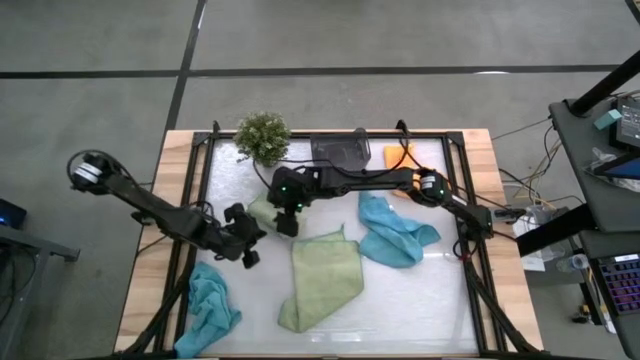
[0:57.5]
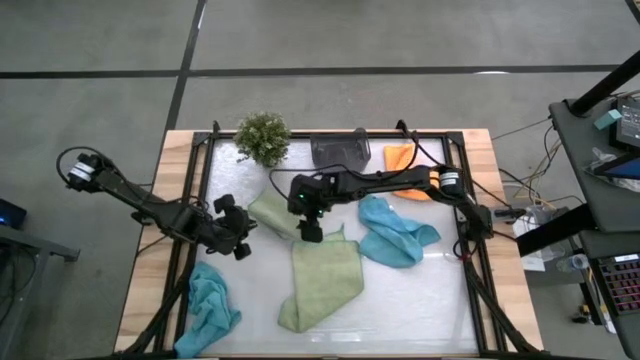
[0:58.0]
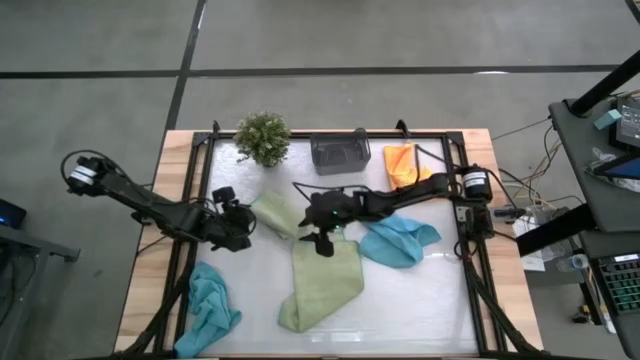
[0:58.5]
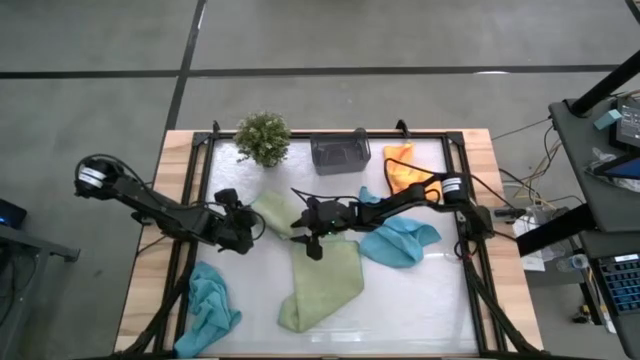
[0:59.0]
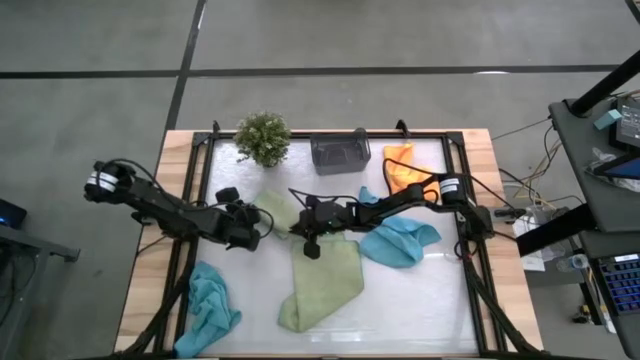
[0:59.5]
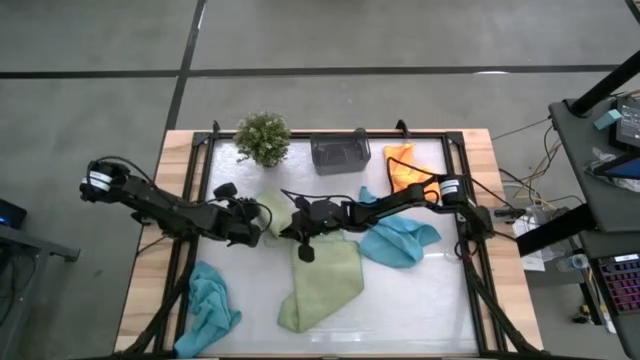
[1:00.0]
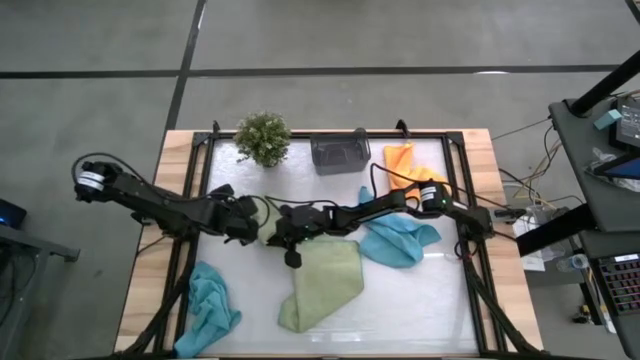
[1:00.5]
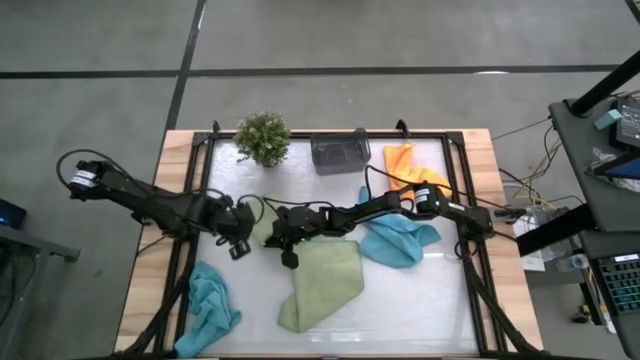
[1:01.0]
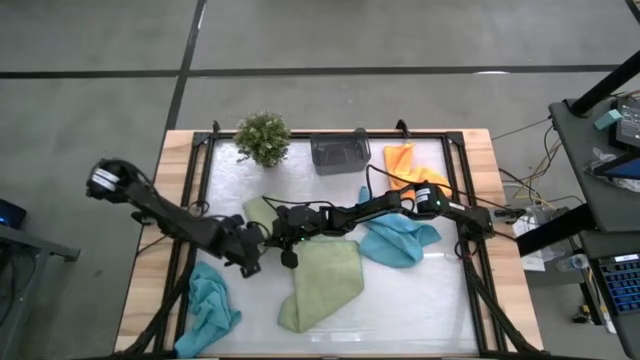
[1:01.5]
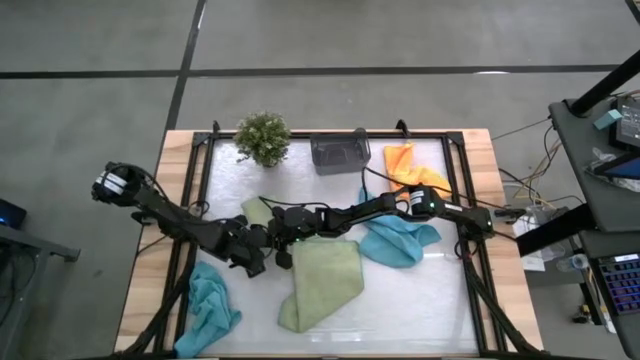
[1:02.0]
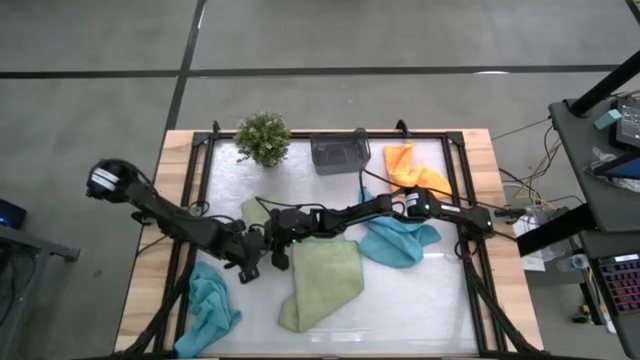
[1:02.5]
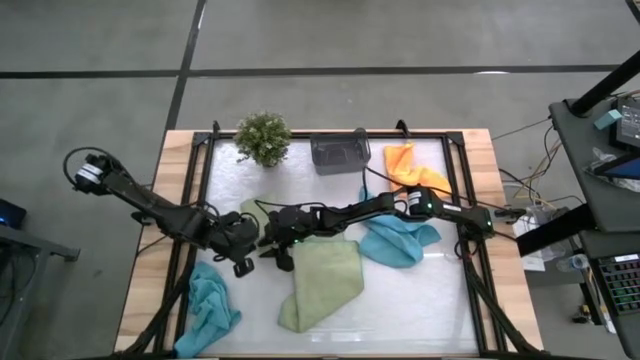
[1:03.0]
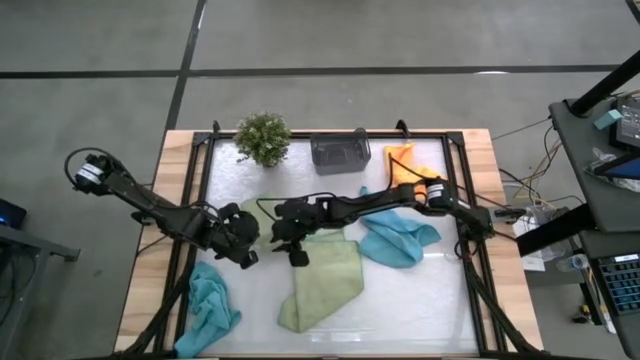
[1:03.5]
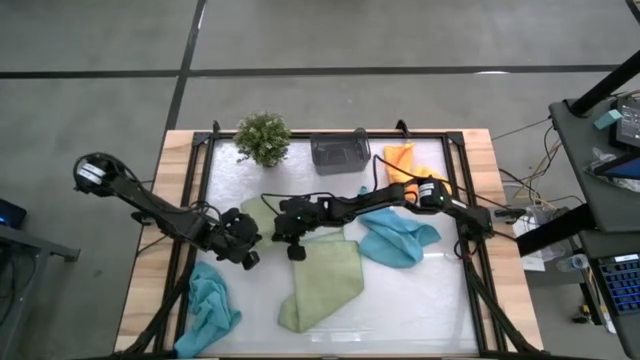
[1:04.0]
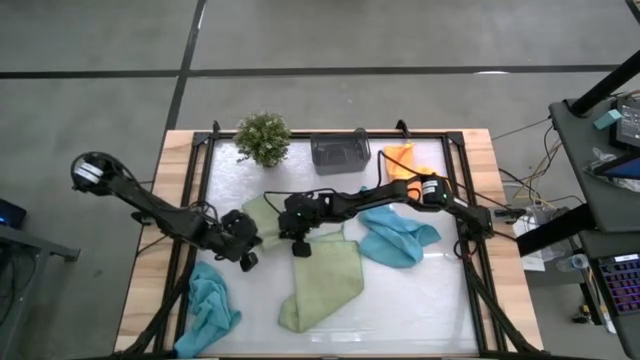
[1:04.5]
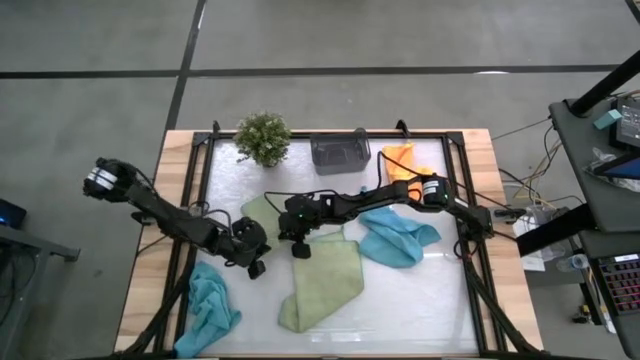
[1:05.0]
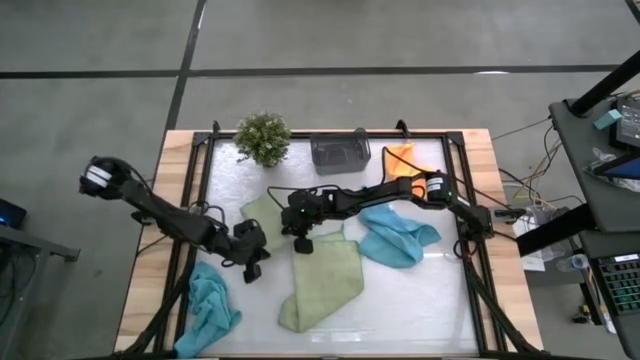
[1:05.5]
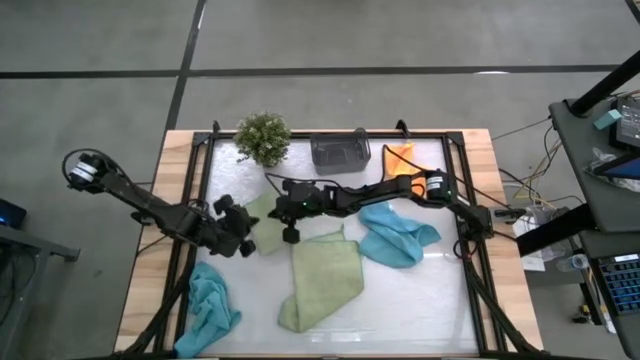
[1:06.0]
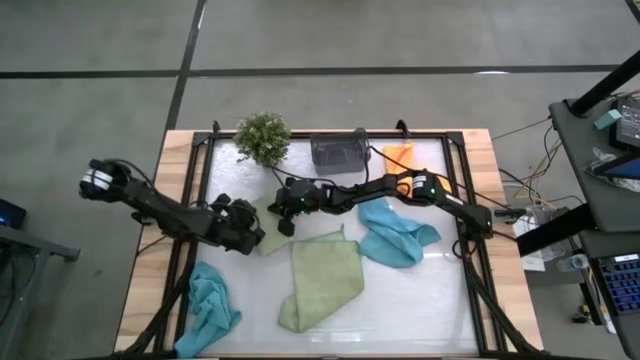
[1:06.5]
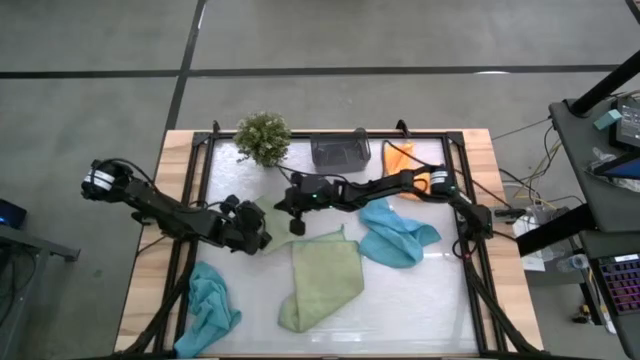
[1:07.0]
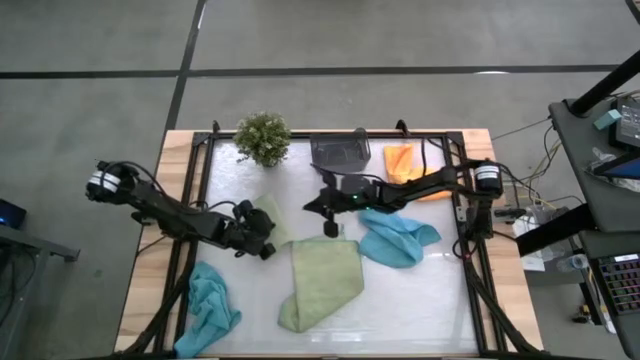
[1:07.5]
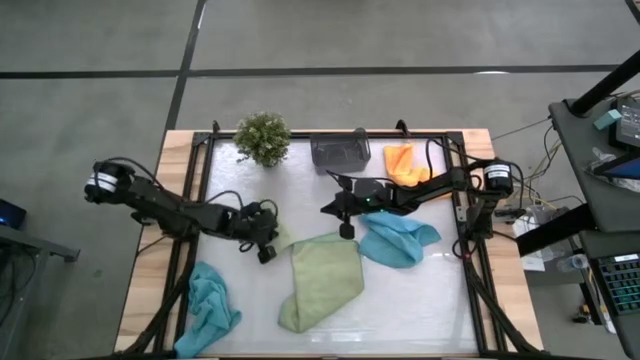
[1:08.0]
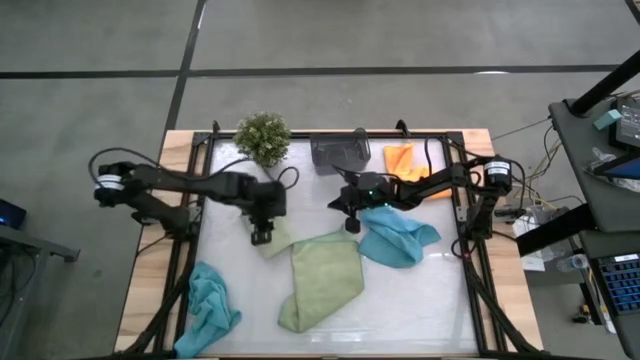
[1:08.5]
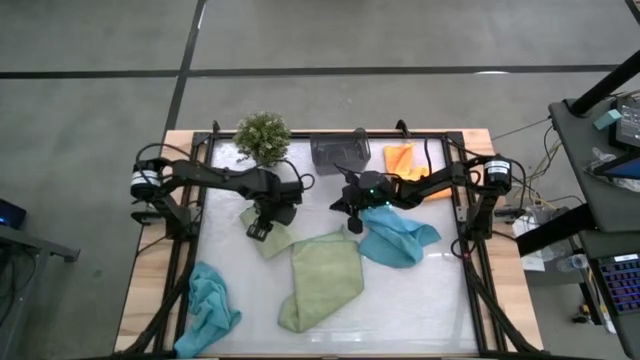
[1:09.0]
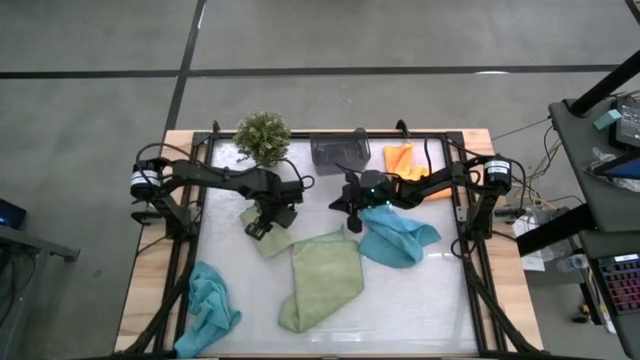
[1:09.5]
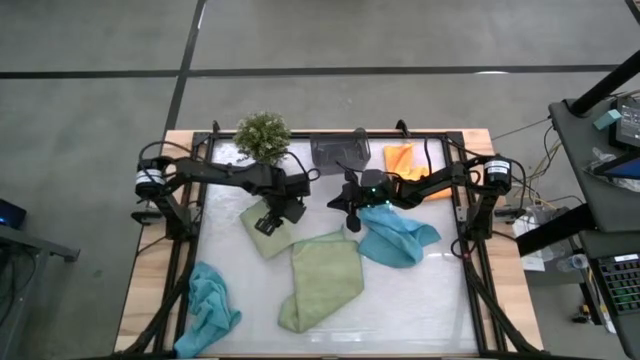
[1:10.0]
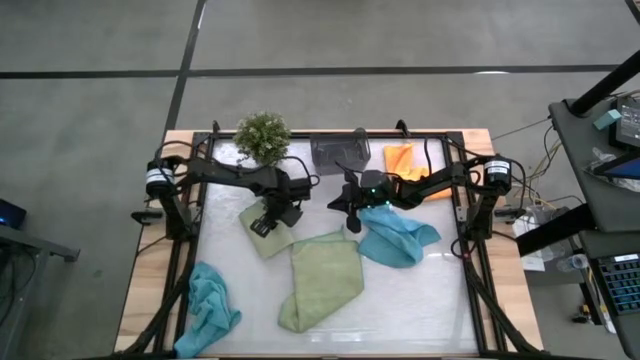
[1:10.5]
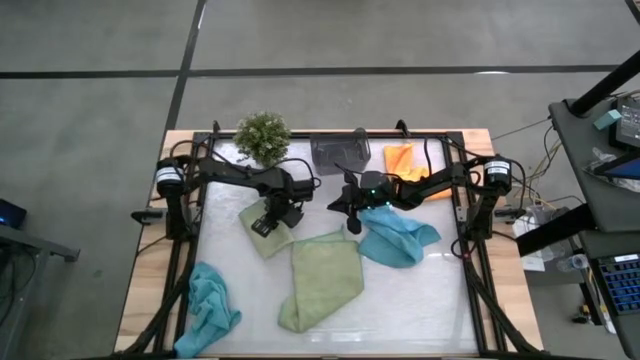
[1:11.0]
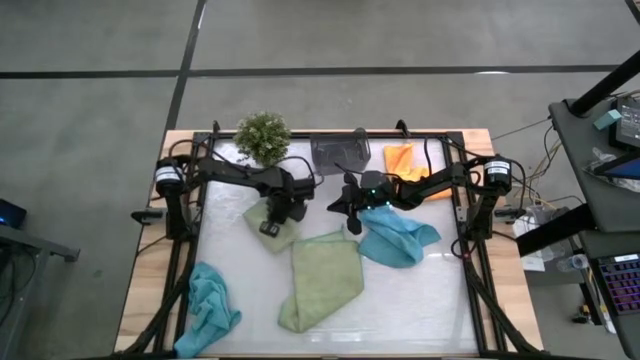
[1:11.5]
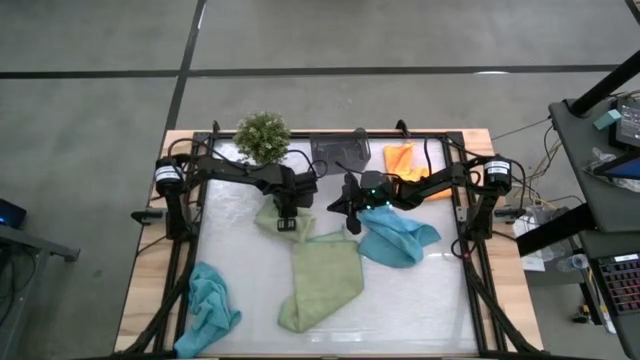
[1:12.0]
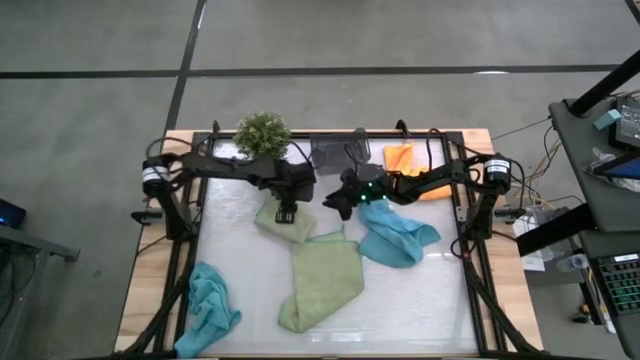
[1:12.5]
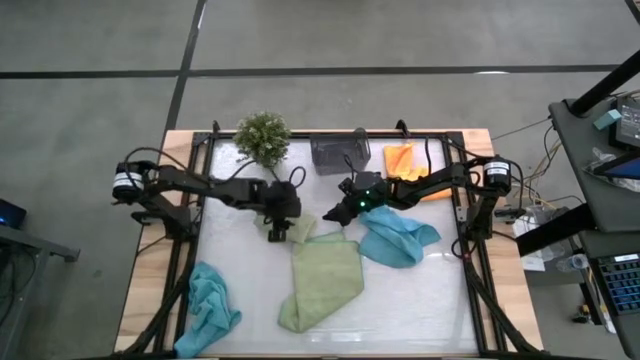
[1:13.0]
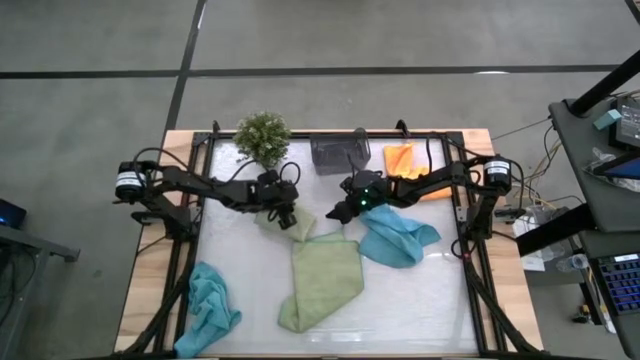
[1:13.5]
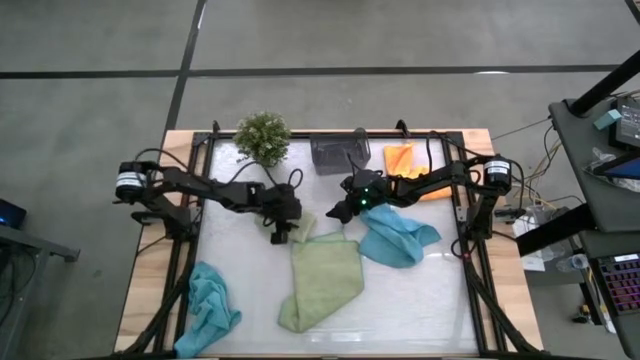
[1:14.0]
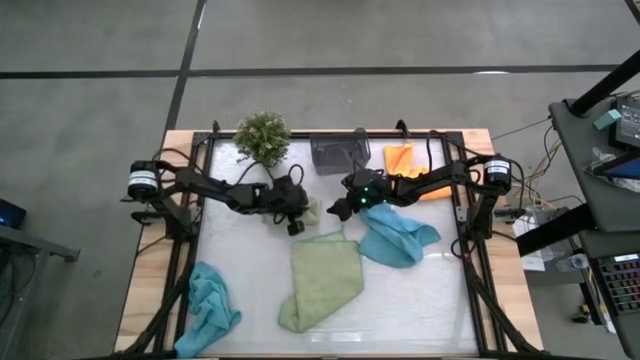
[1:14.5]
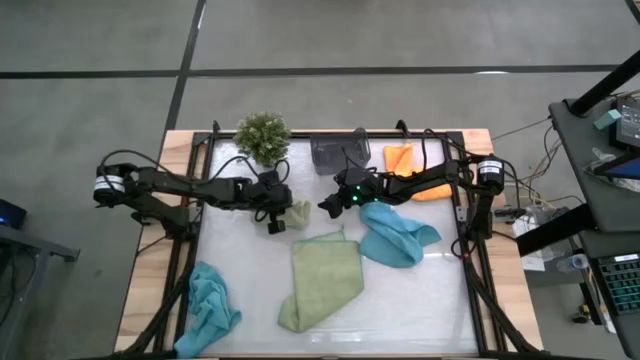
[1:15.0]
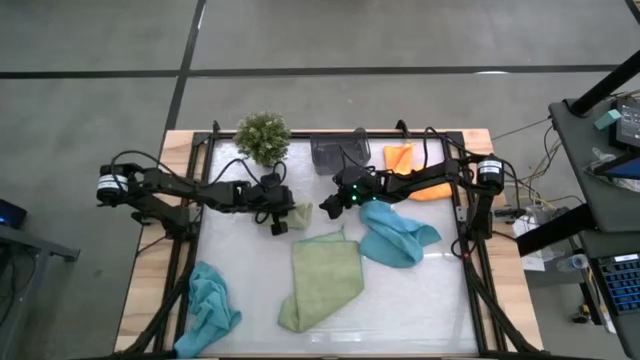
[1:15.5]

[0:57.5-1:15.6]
Task: Fold microfiber towels
Fold the left green towel

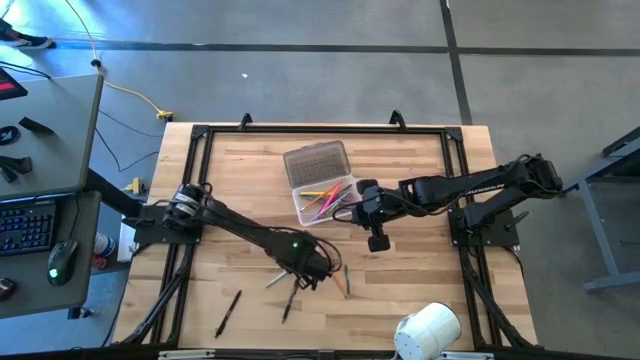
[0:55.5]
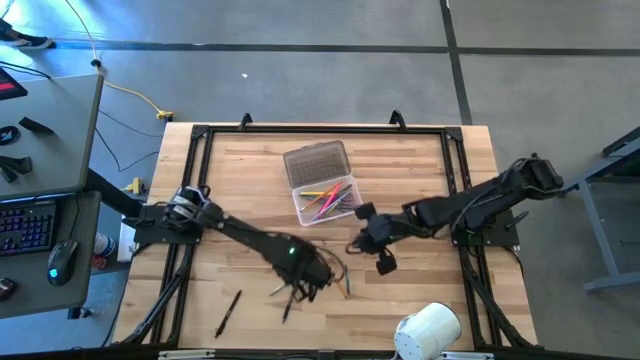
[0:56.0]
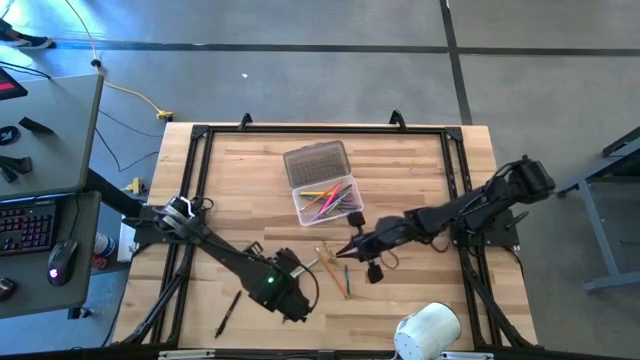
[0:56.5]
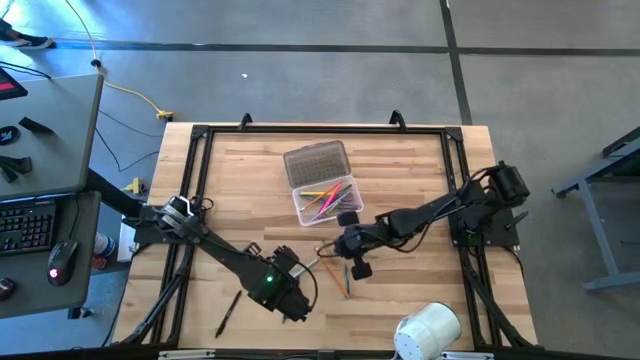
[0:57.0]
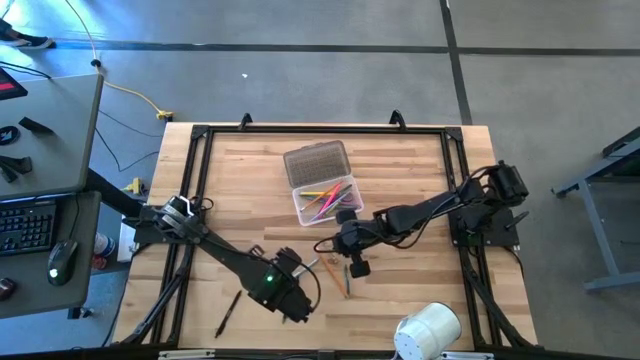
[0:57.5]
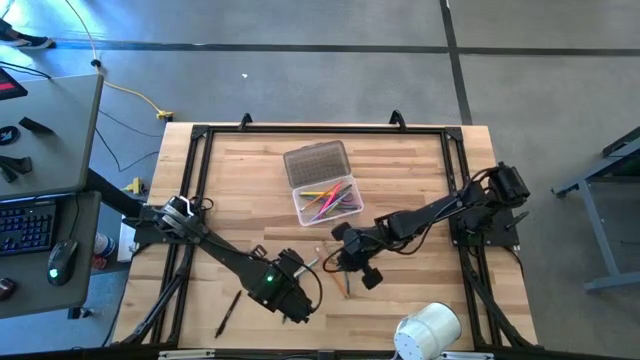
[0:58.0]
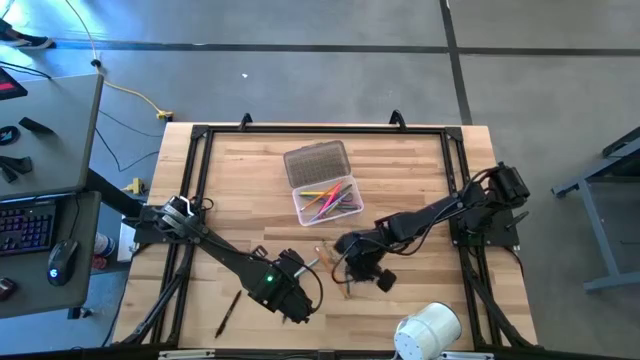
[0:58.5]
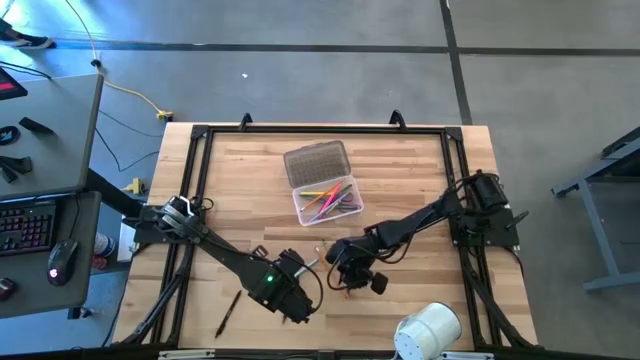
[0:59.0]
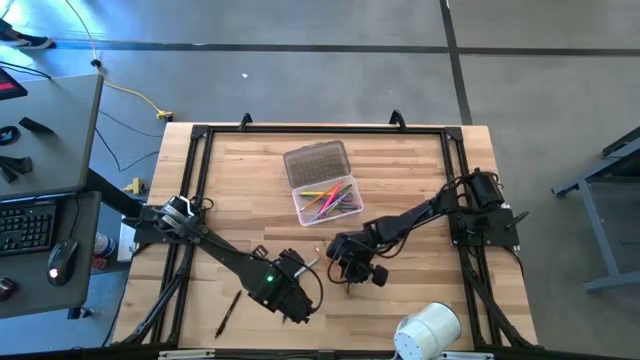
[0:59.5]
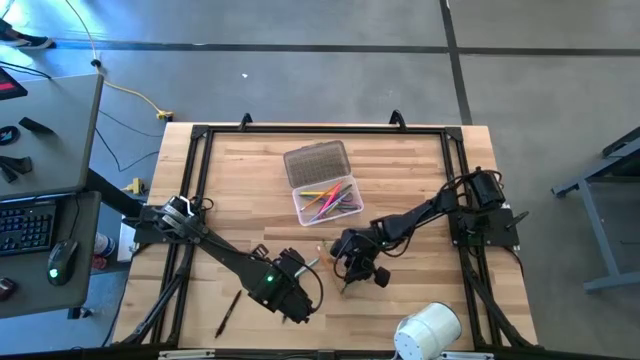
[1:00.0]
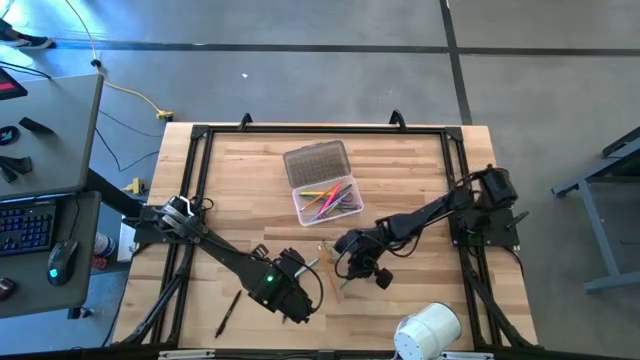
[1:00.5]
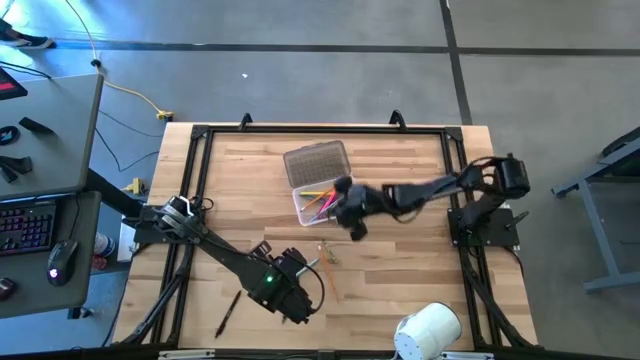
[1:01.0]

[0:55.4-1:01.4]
Task: Pick & place school supplies into a supply box
Put the green crayon into the supply box
